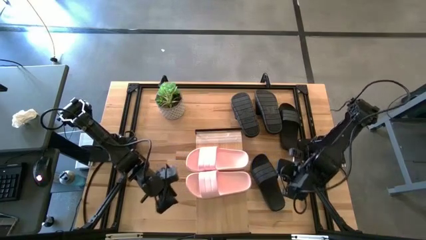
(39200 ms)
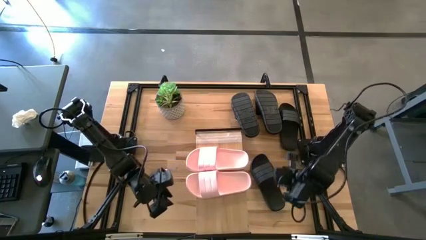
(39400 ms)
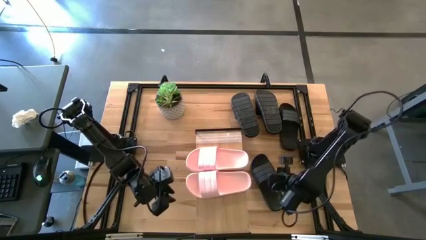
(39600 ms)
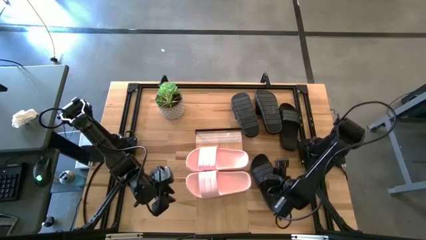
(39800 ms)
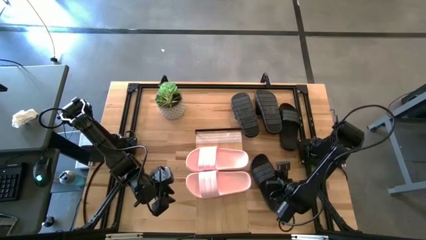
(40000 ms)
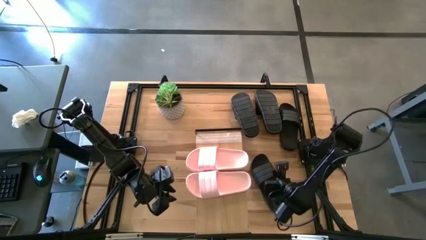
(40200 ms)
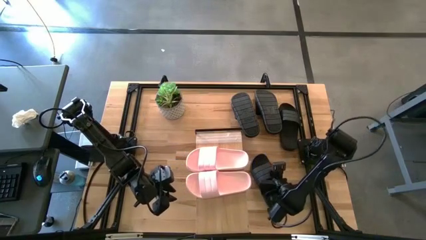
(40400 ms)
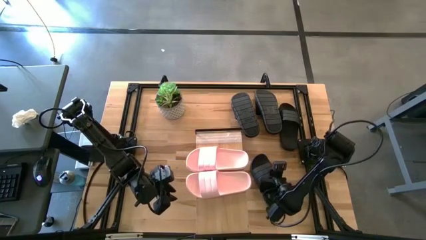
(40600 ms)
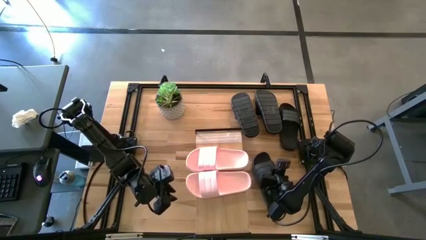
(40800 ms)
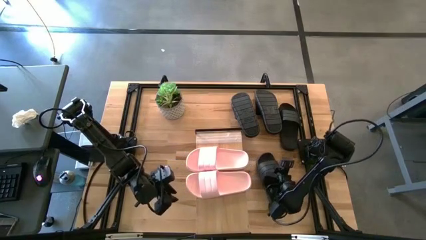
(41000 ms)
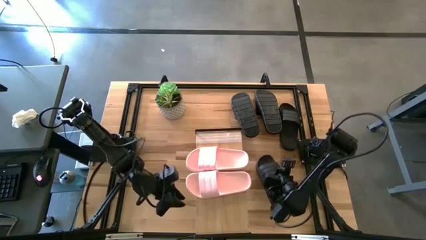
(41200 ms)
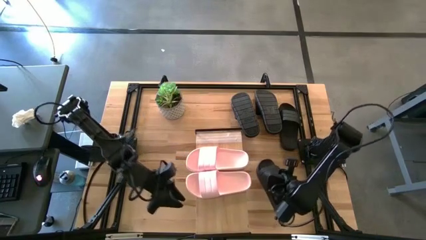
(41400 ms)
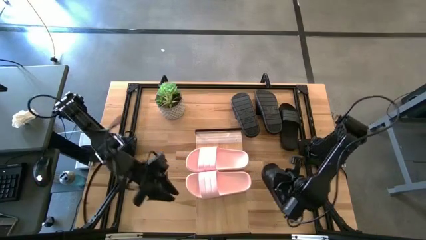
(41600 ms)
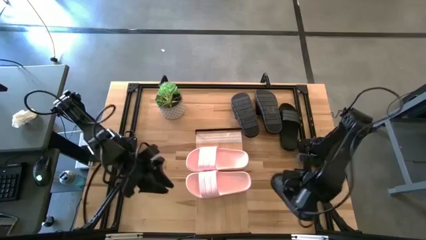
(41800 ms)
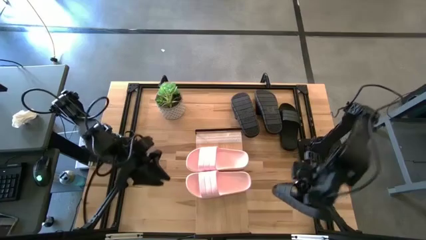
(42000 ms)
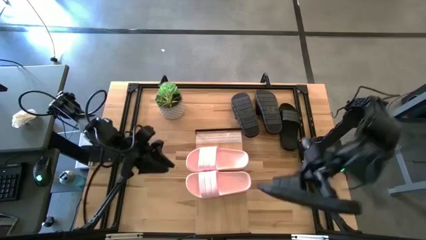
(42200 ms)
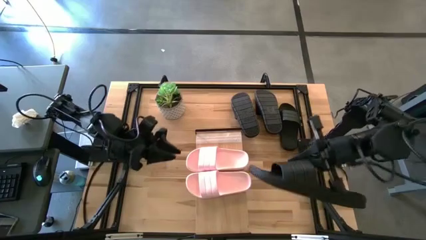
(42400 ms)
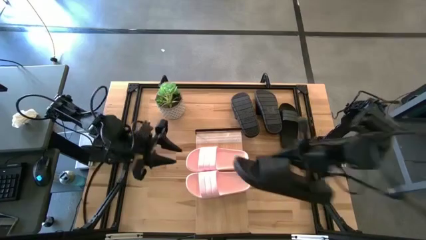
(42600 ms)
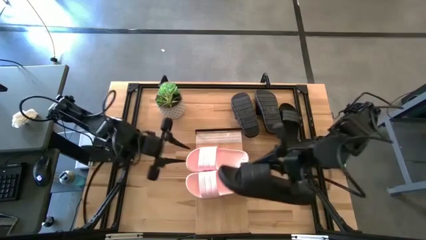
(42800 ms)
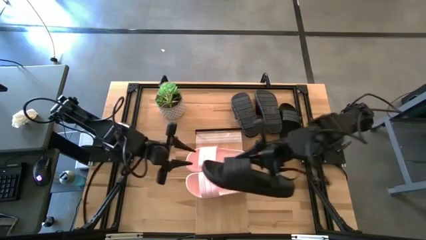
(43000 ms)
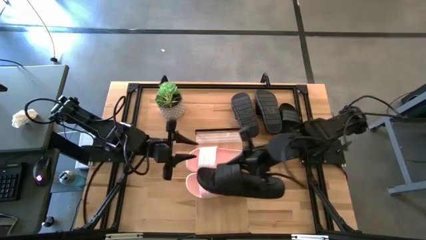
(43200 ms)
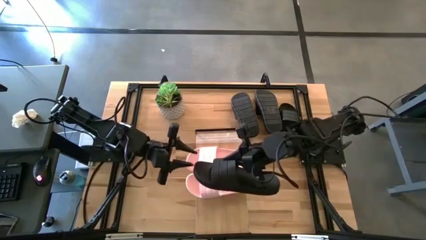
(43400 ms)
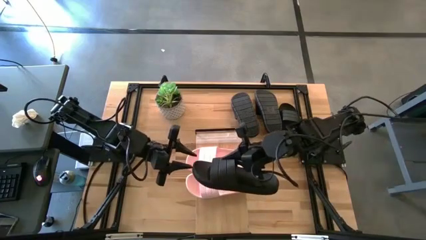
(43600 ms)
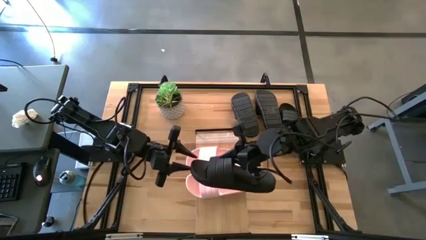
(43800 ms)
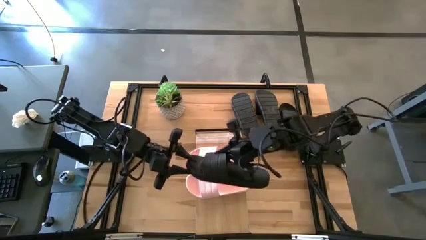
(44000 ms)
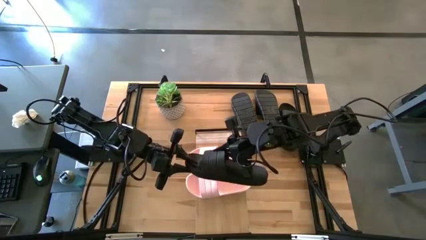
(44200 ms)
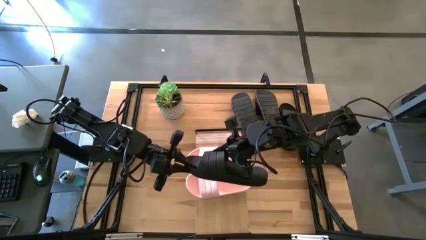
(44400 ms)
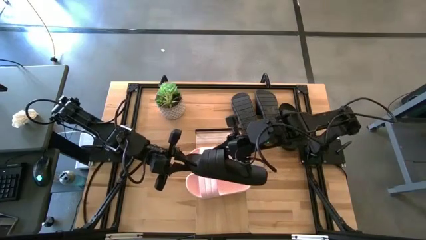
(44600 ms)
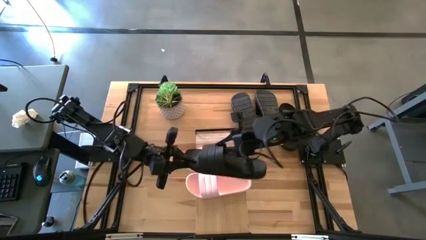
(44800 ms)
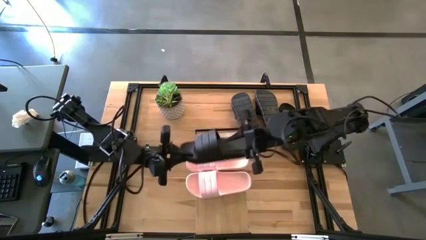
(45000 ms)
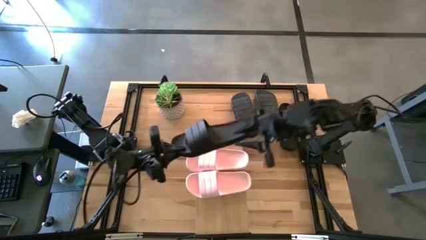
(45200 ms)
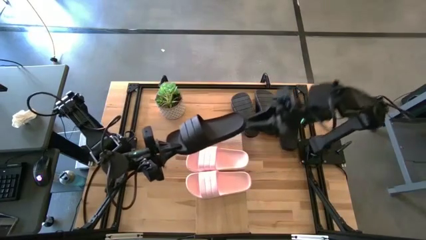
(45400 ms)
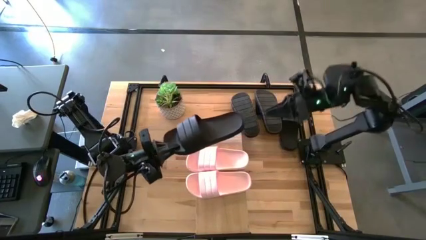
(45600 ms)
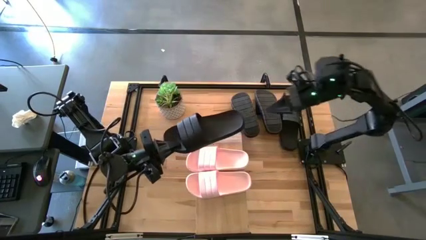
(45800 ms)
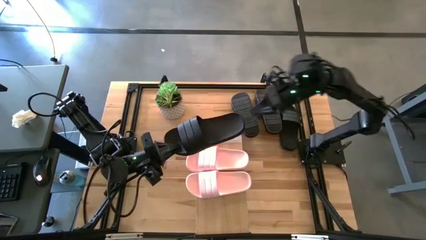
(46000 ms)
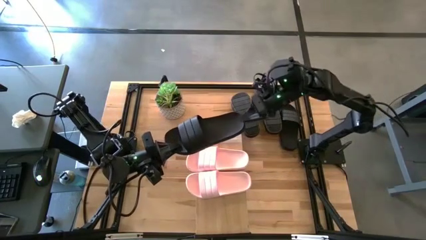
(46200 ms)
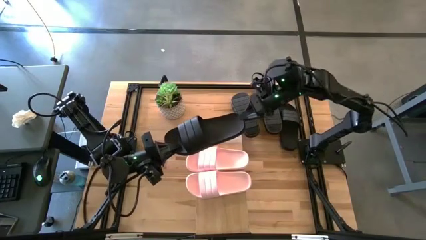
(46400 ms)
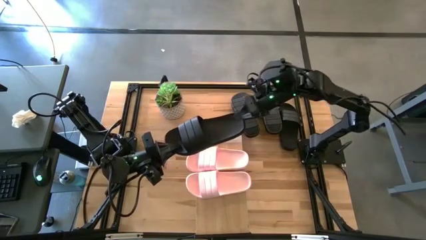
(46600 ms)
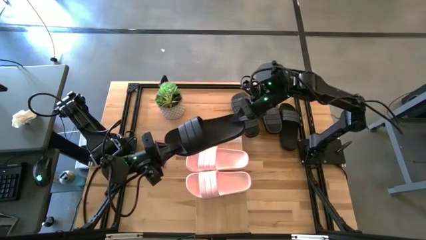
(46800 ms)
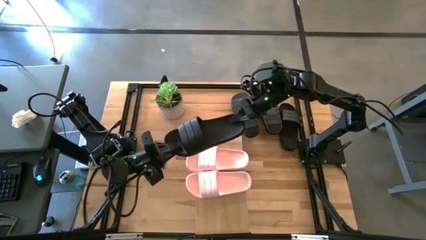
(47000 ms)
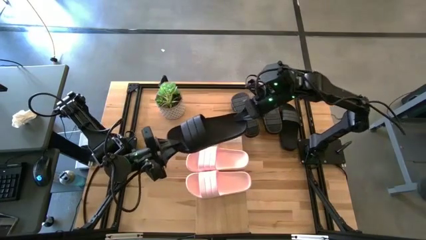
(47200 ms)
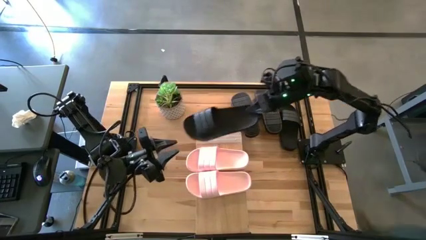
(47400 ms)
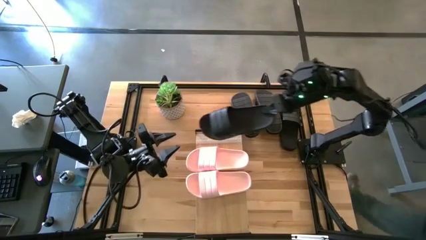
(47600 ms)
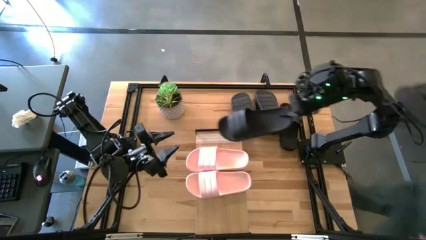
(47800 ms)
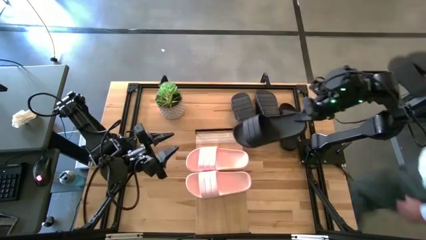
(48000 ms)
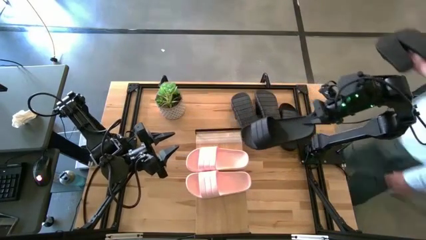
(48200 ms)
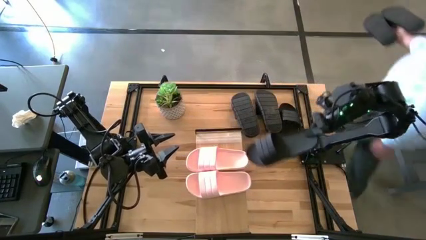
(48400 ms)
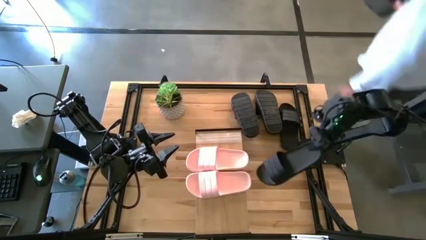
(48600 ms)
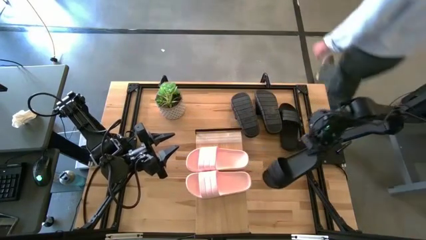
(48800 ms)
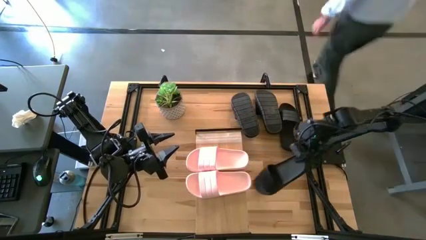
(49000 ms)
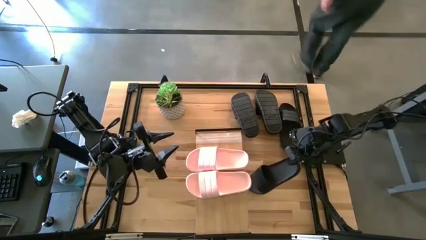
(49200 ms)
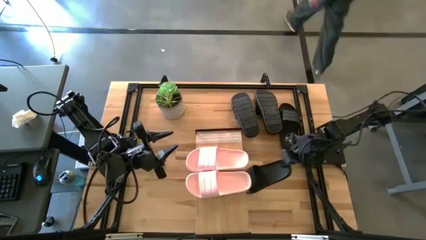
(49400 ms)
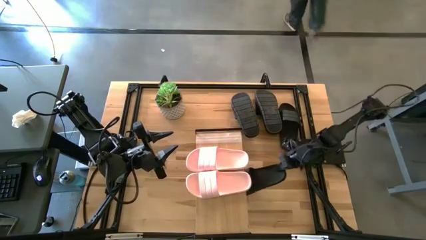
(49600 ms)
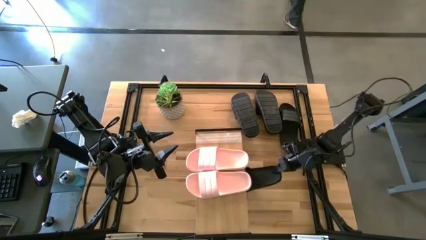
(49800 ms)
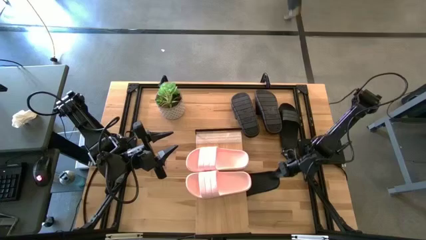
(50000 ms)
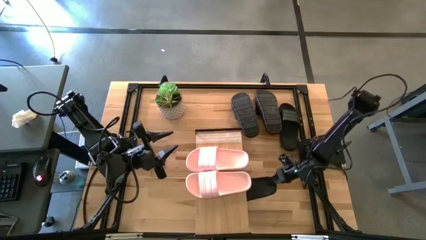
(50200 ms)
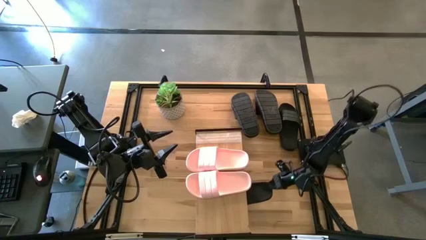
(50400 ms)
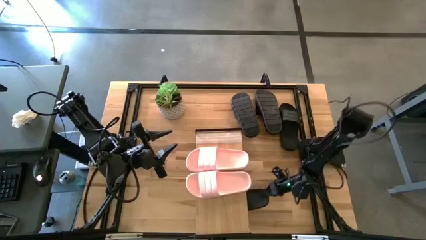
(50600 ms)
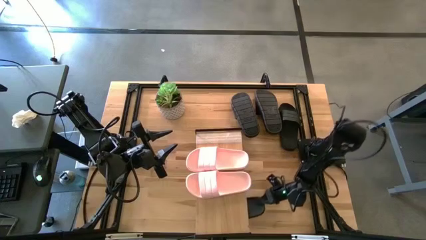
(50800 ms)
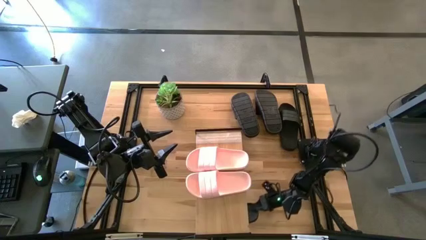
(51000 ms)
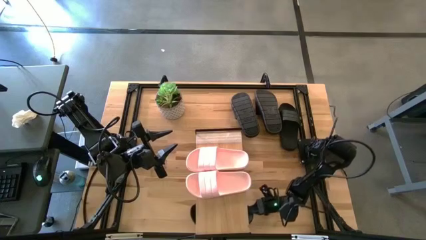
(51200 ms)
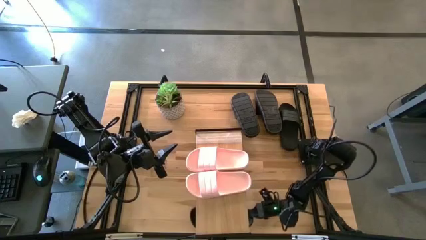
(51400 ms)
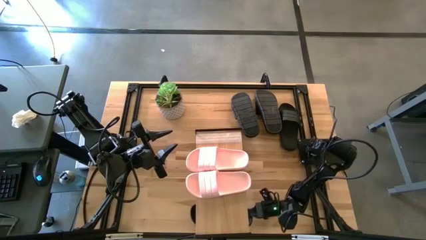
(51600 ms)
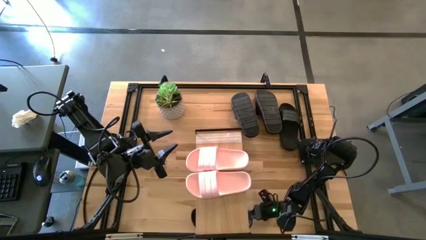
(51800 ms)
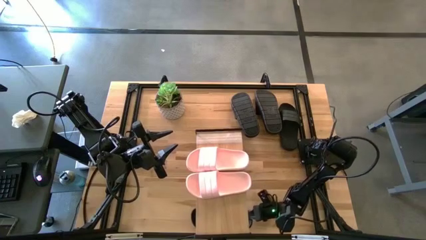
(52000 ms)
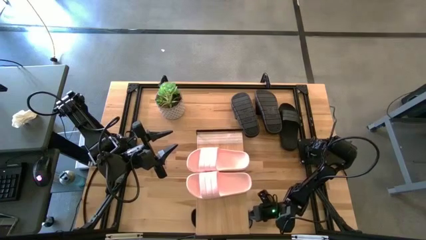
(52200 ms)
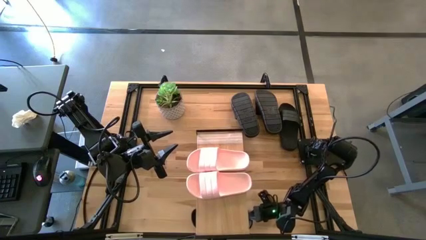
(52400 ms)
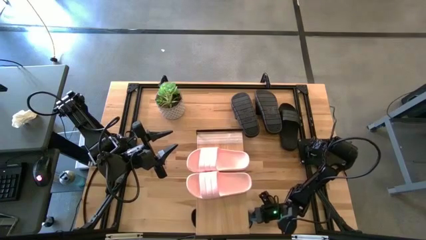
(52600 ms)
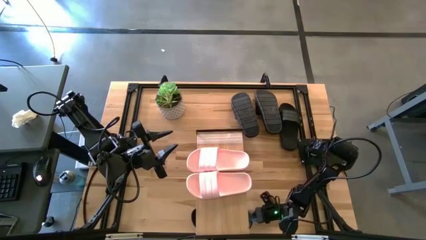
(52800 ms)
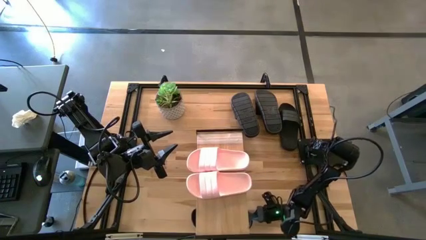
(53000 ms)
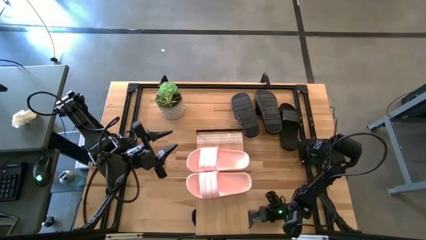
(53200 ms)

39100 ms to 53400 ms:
Task: Pick and place slides into the shelf
Put the black slipper under the shelf

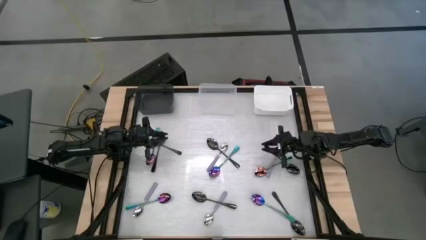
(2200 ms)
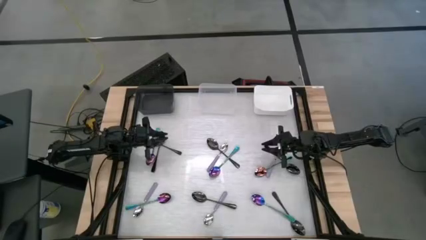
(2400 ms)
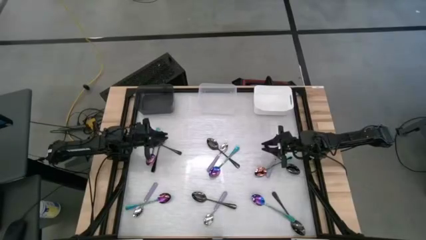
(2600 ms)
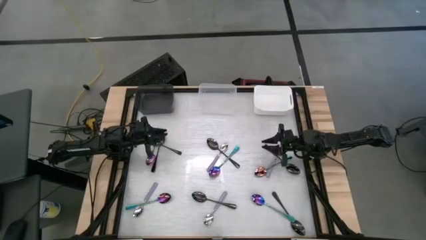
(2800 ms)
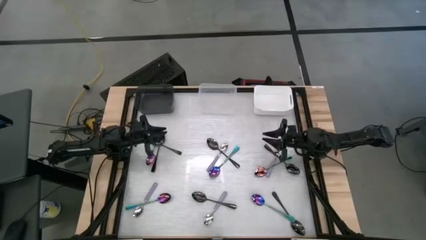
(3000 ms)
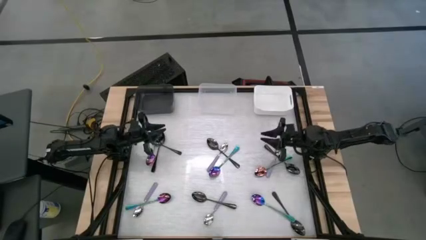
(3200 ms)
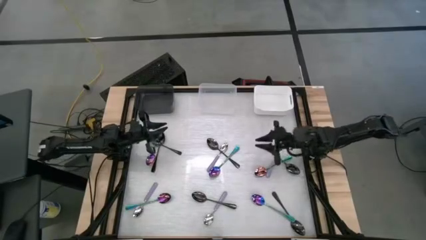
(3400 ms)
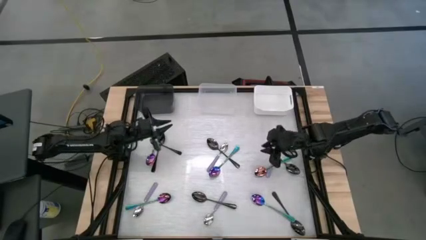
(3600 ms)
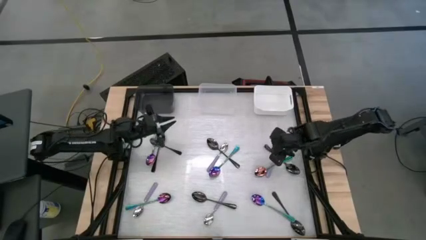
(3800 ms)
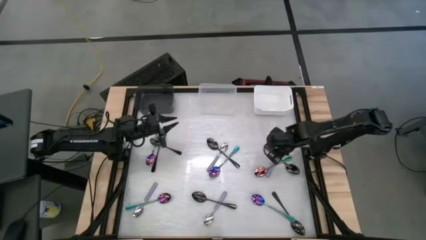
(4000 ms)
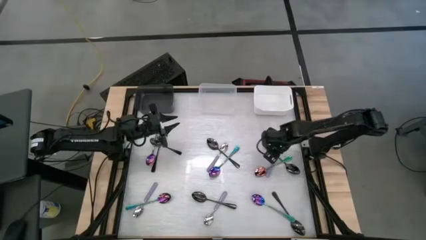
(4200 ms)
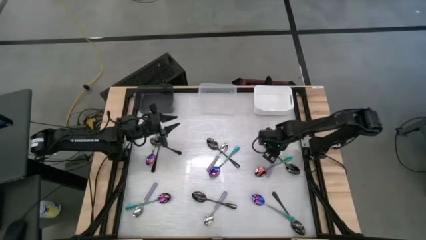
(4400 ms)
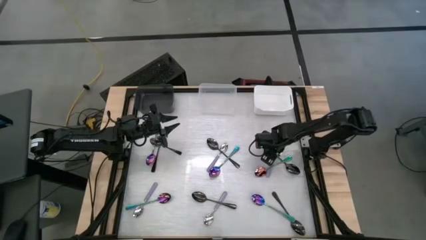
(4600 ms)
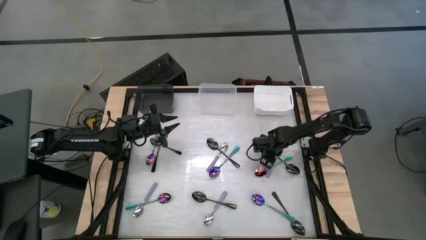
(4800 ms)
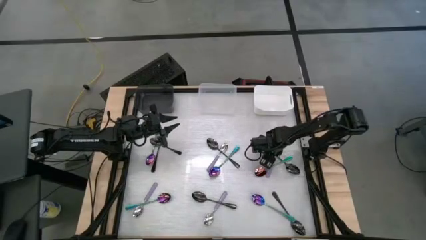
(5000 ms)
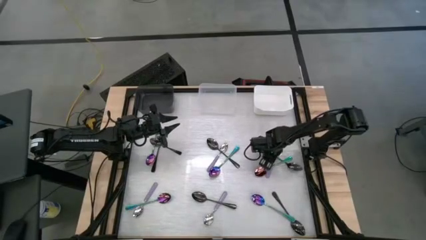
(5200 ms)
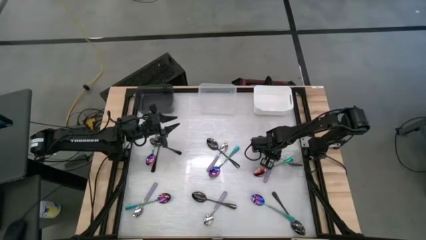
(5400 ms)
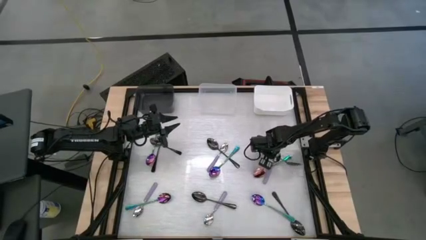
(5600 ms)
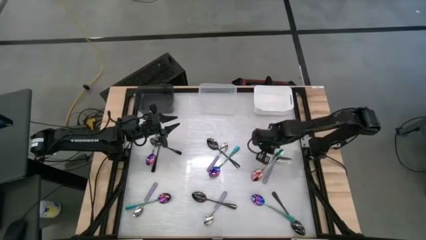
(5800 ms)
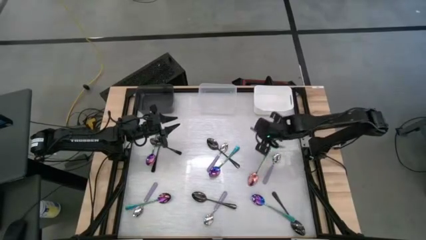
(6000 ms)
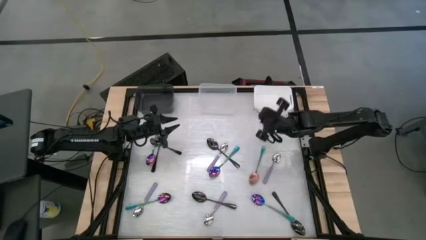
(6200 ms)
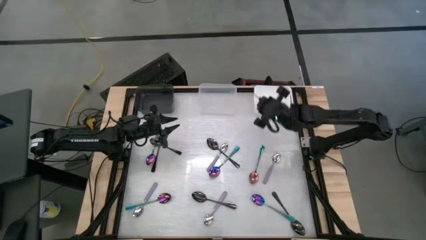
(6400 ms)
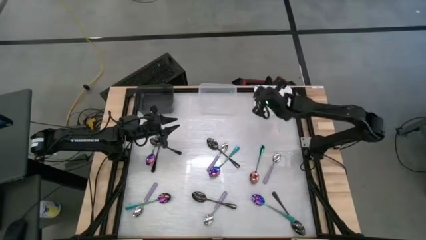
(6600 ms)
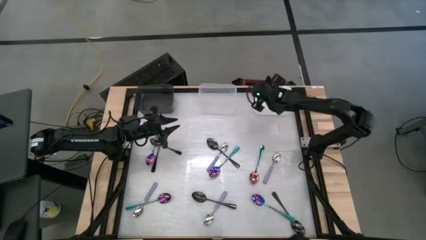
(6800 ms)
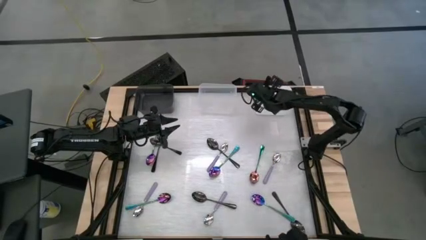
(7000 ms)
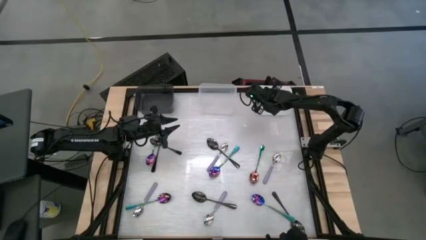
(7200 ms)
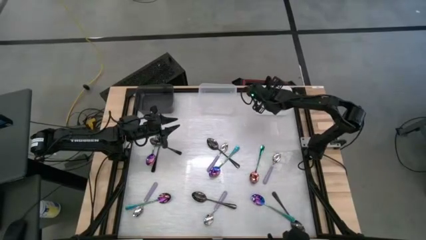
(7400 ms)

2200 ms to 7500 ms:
Task: Sort silverware by color (type)
Put the black spoon into the white bin
